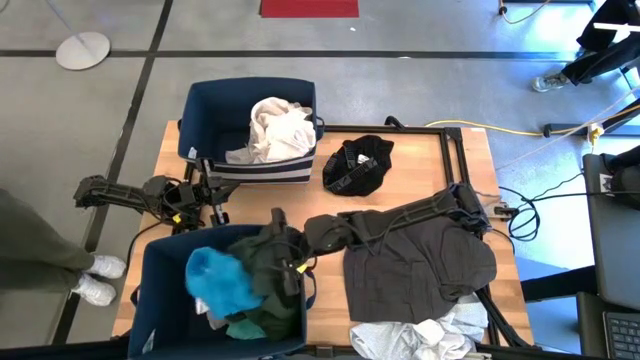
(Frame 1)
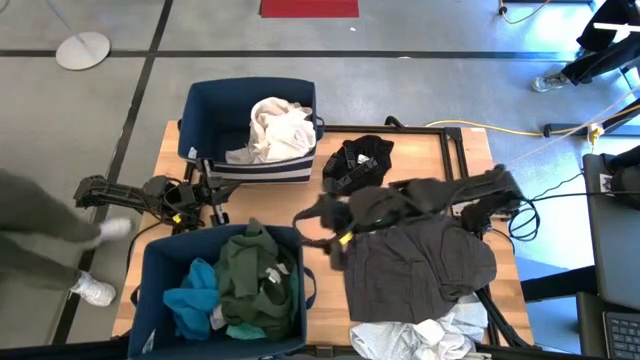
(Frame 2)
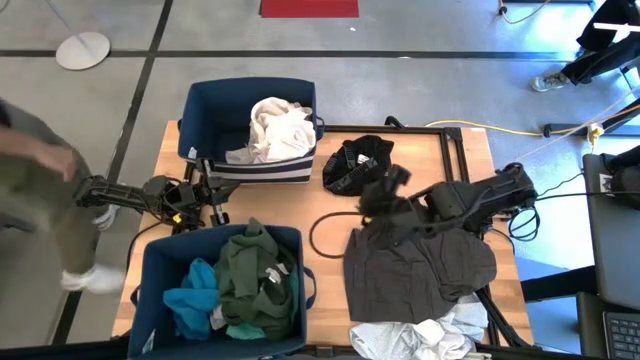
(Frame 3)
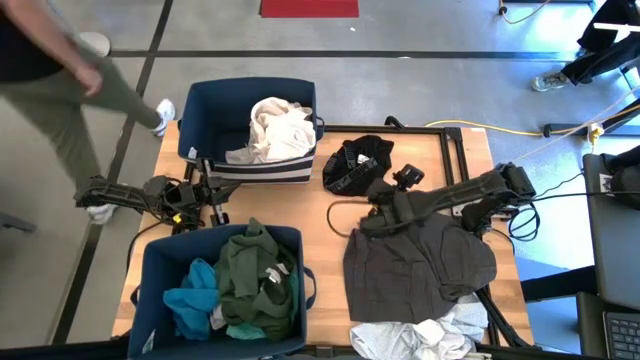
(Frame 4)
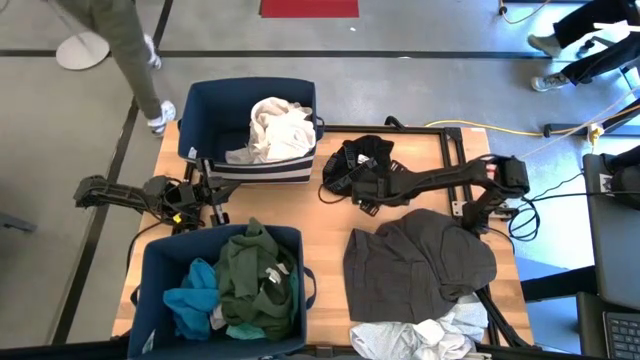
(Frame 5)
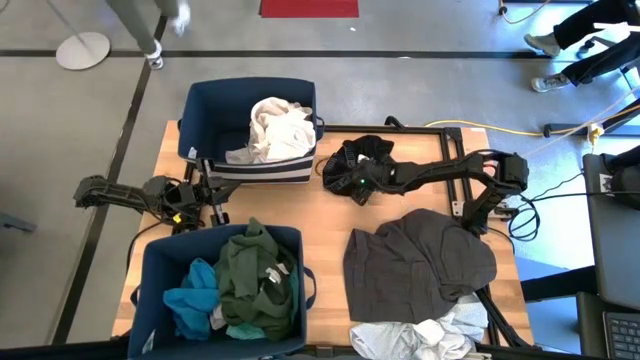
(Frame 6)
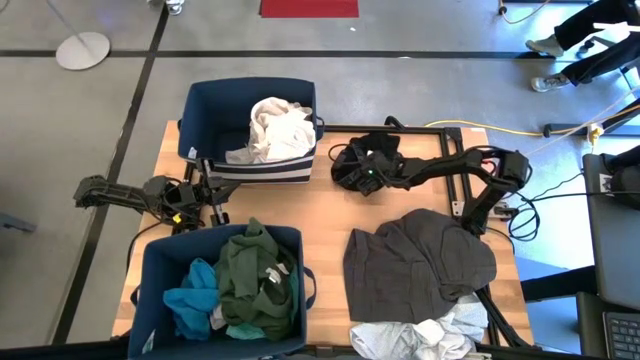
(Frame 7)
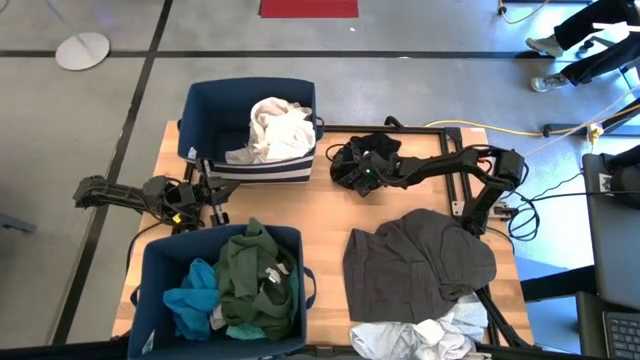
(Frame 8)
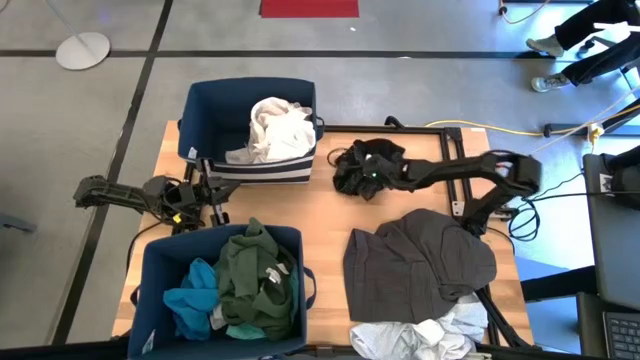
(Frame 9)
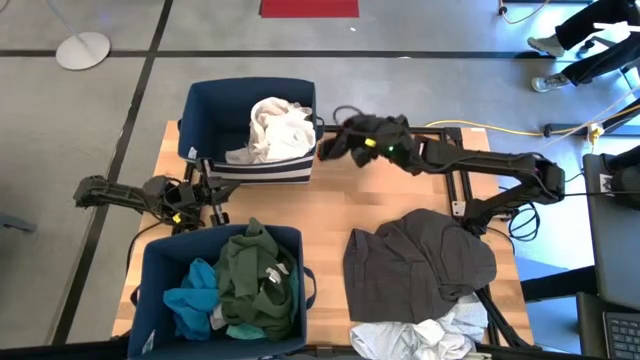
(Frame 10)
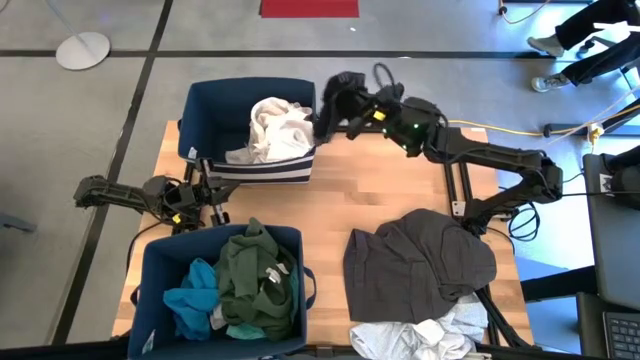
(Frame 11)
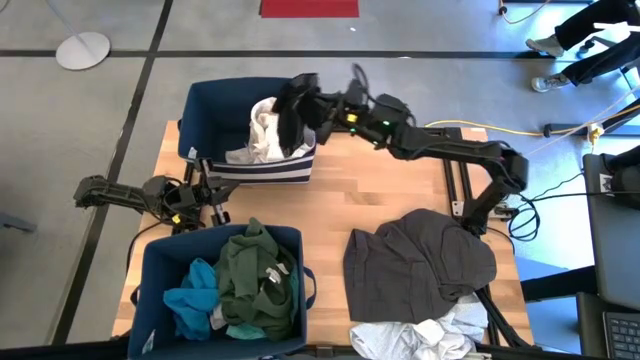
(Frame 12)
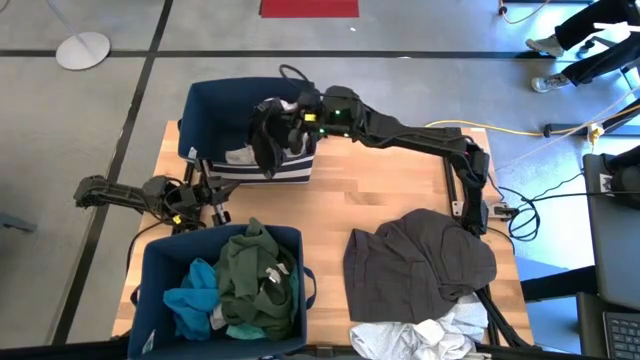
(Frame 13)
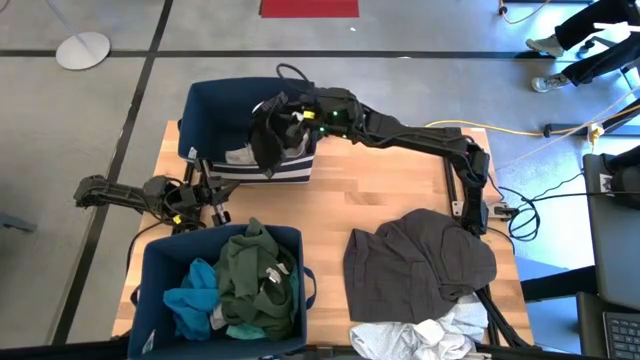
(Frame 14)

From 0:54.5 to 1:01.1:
Task: Sort clothes
Put the black underwear into the top blue laundry bin

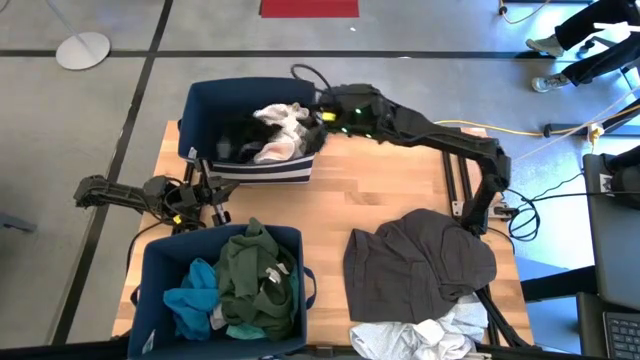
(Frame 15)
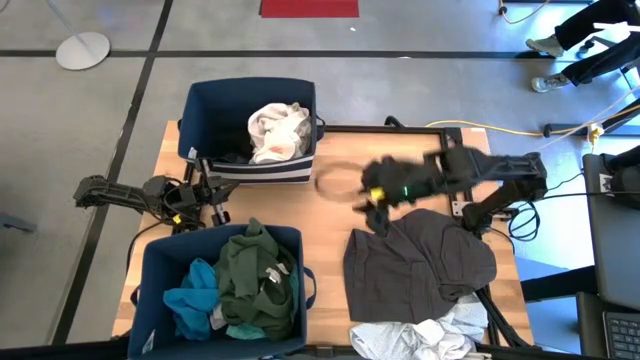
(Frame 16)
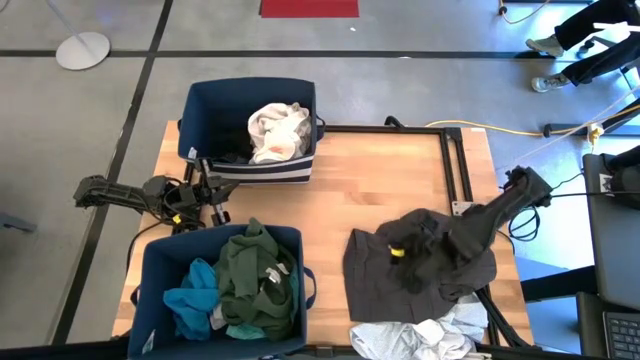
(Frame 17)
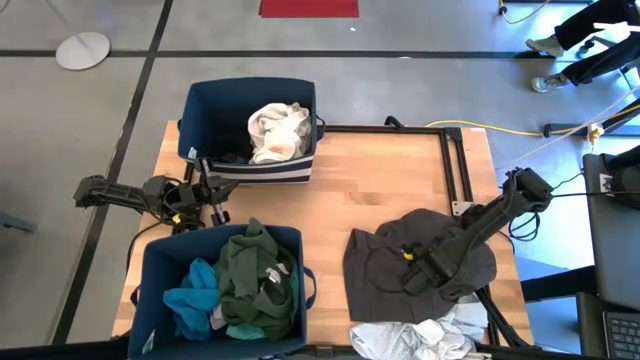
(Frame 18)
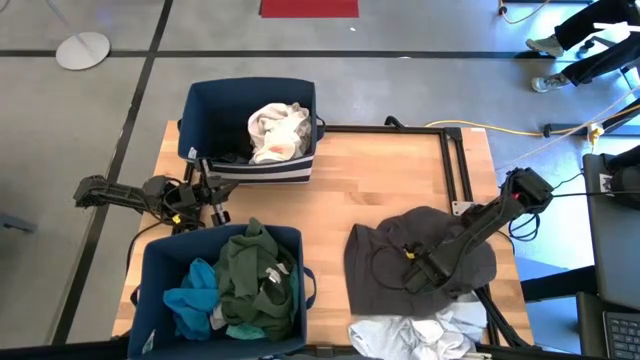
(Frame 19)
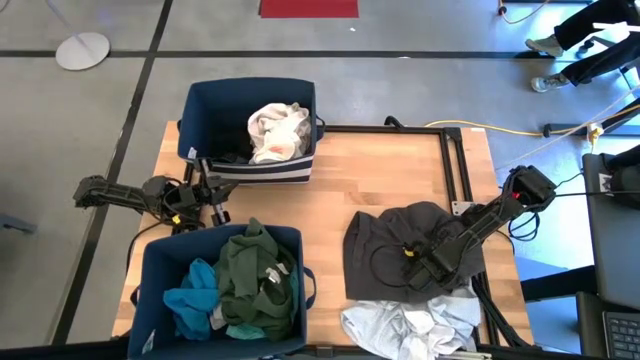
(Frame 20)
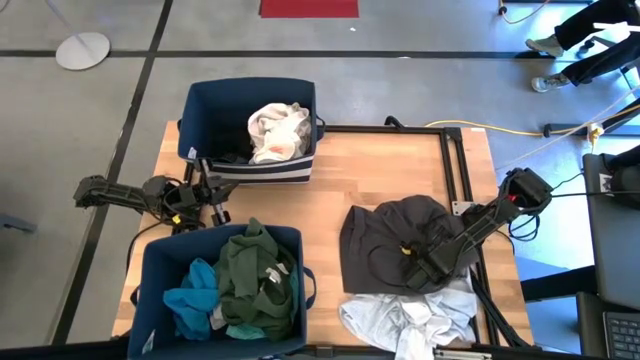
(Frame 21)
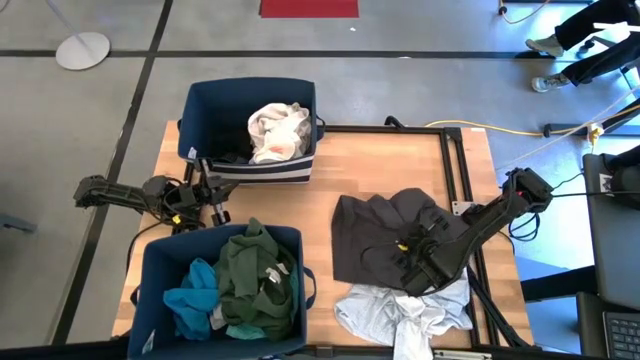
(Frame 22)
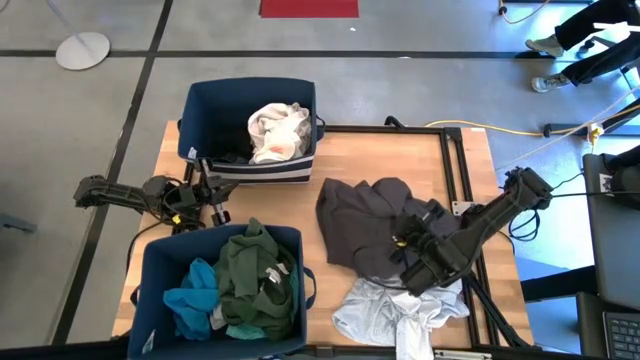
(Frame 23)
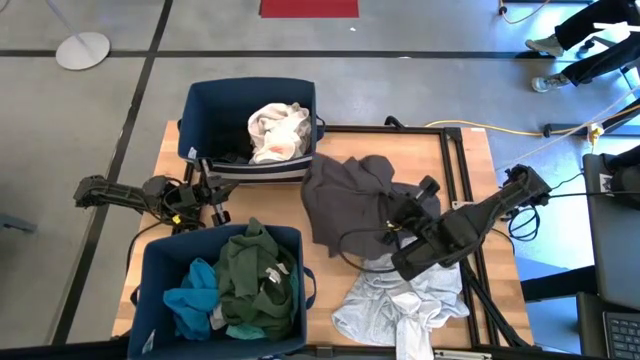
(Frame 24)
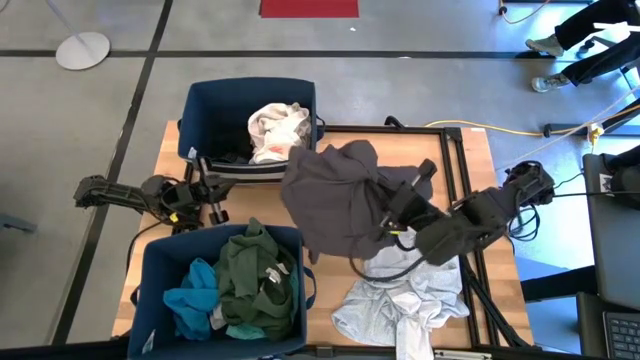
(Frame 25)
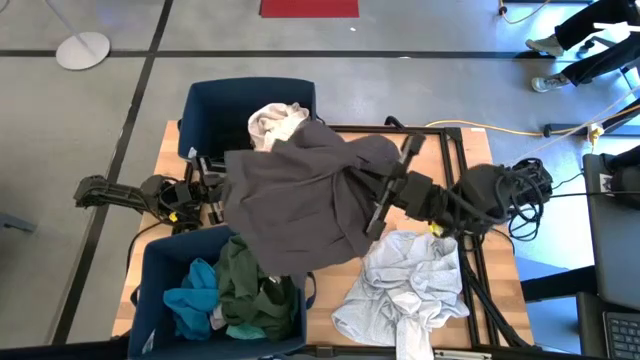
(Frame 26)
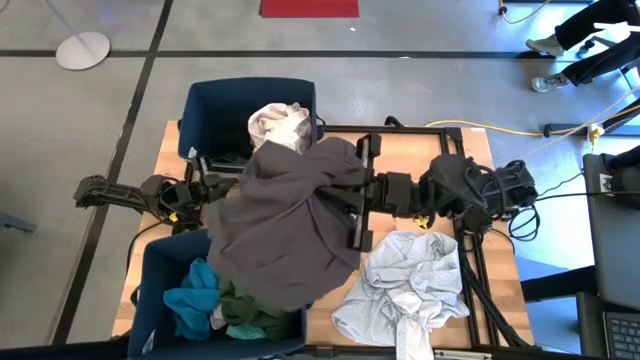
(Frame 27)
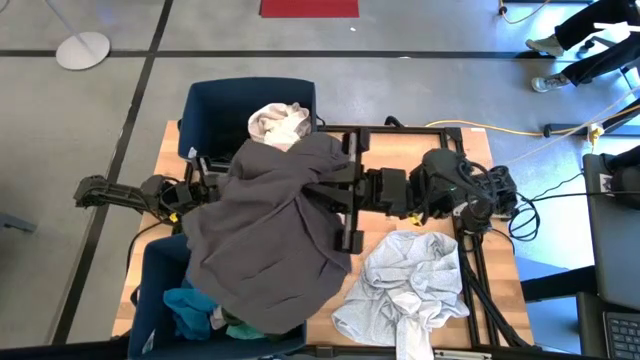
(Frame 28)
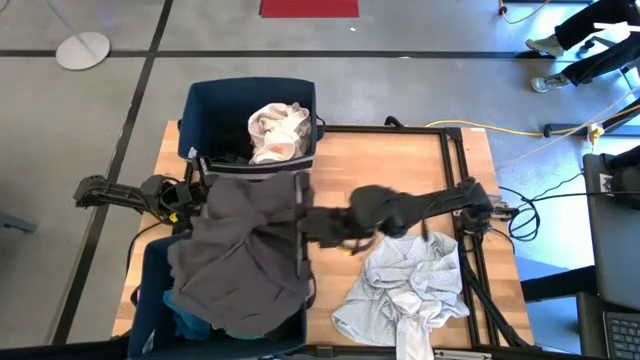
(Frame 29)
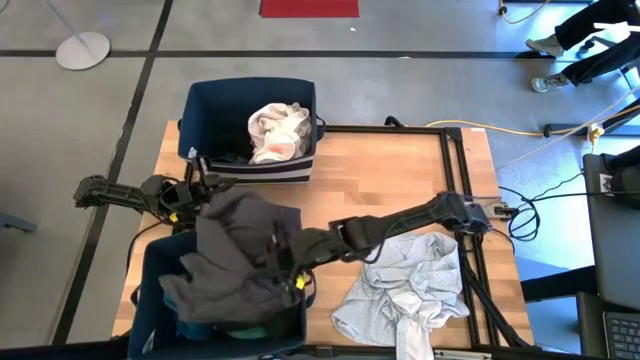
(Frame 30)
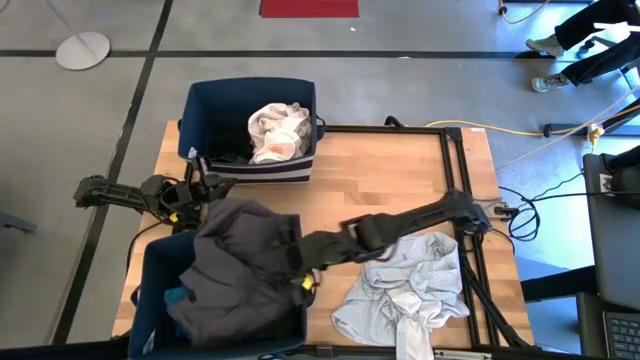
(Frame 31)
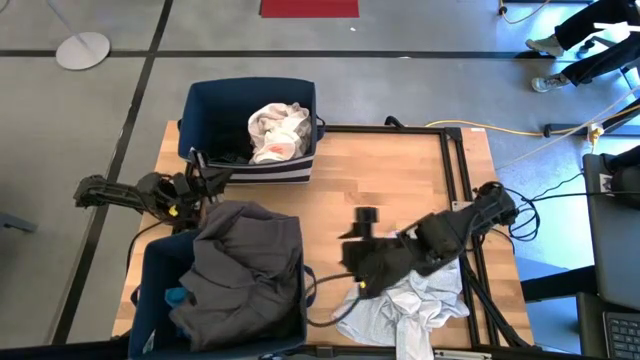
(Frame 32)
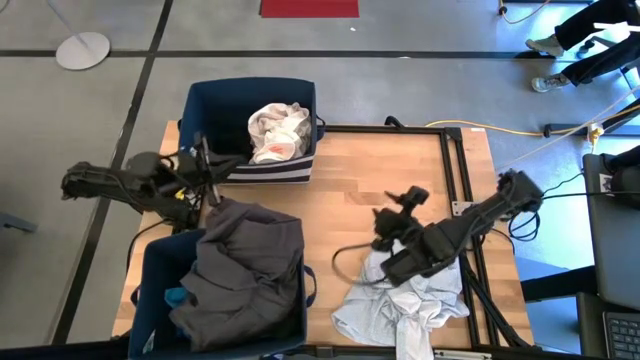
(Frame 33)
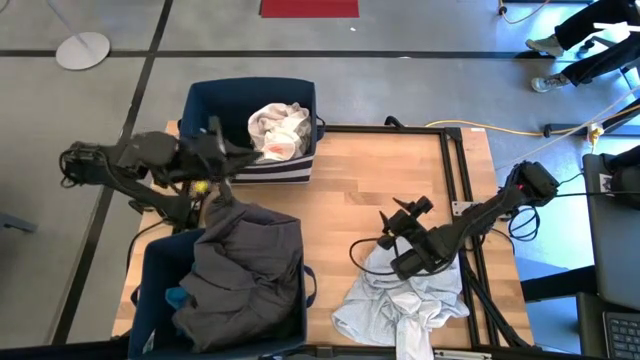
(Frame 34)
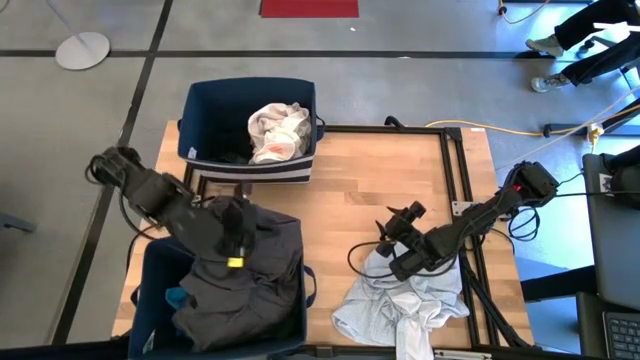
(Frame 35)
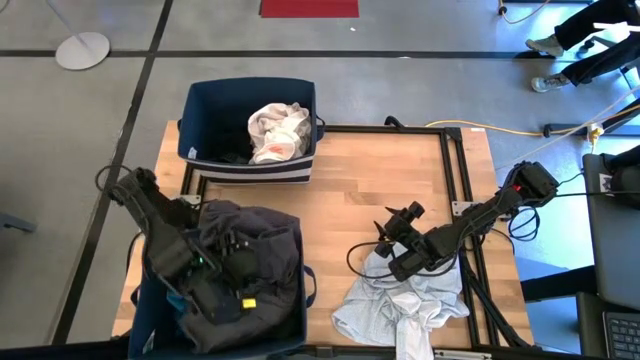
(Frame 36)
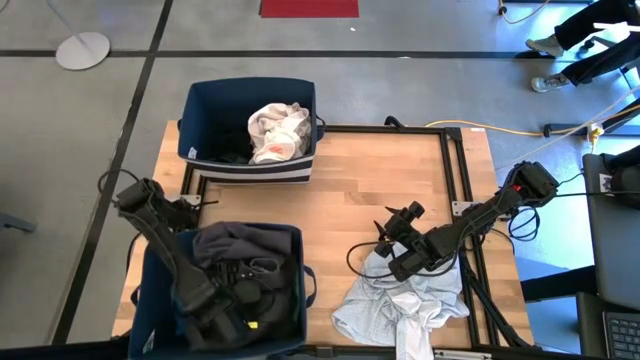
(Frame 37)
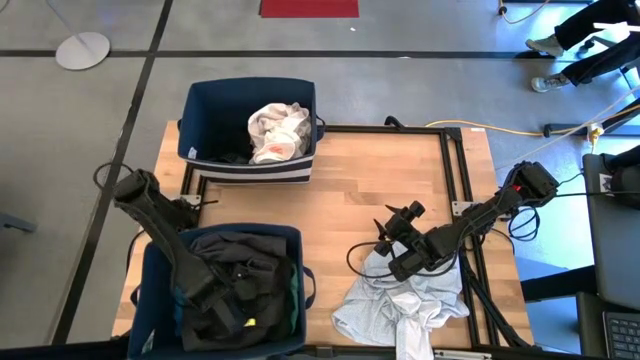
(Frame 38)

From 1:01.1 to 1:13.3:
Put the gray shorts into the bottom blue laundry bin

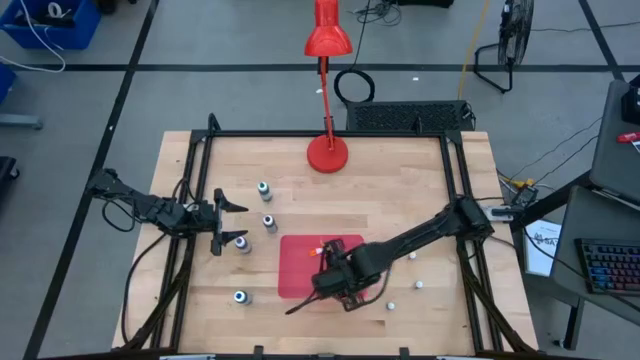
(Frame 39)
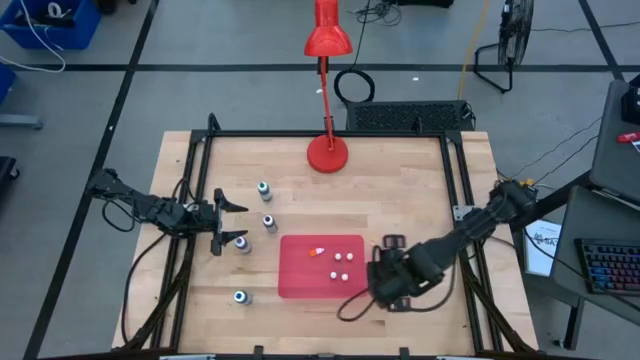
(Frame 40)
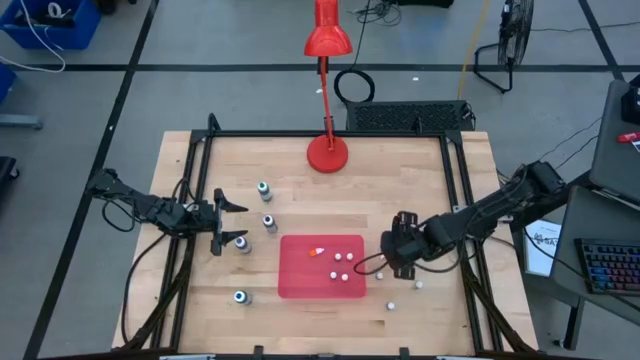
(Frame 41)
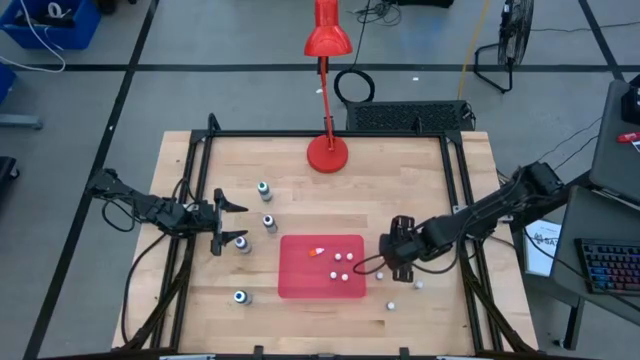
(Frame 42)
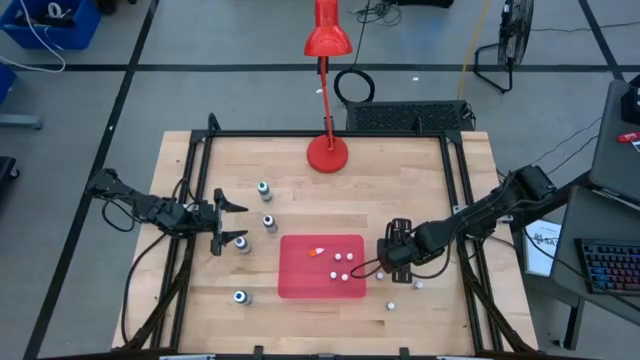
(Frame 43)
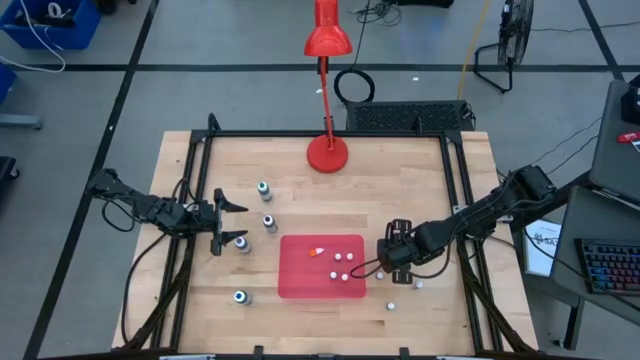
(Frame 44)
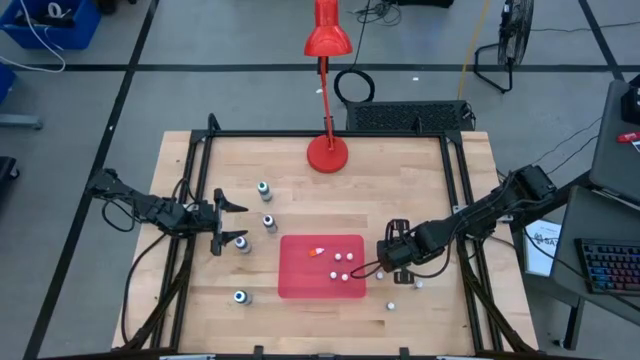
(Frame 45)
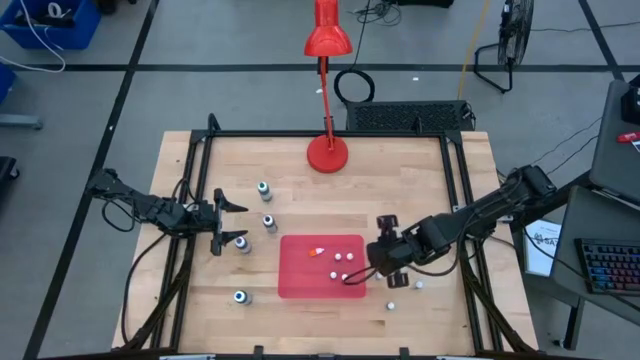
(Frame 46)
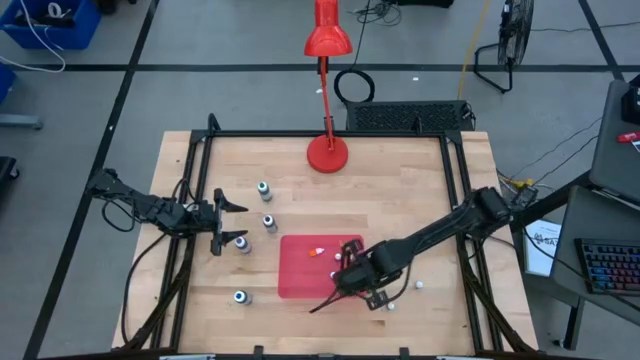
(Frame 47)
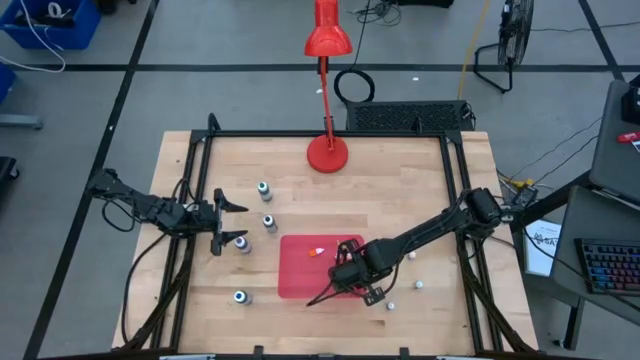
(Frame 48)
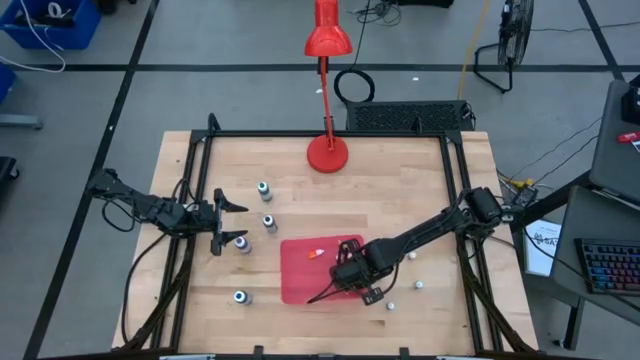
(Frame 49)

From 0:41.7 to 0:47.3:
Task: Pick & Place food coloring
Put the small blue food coloring bottle into the pink container
